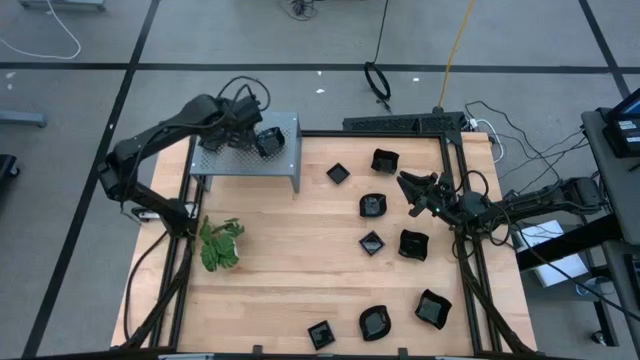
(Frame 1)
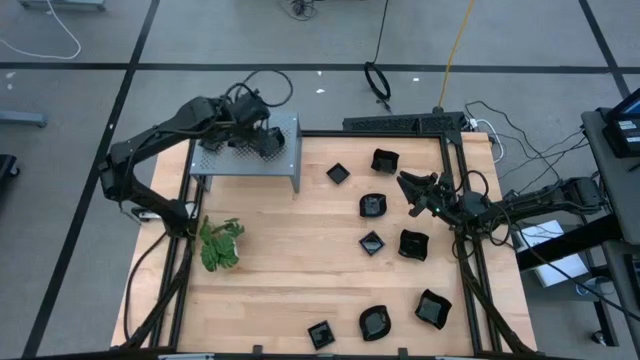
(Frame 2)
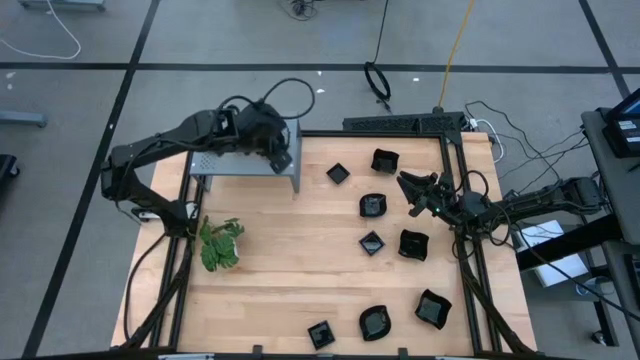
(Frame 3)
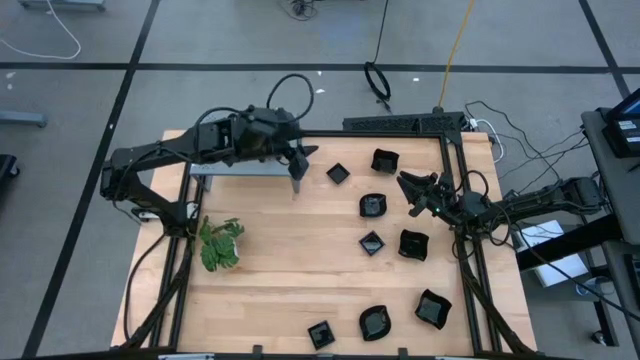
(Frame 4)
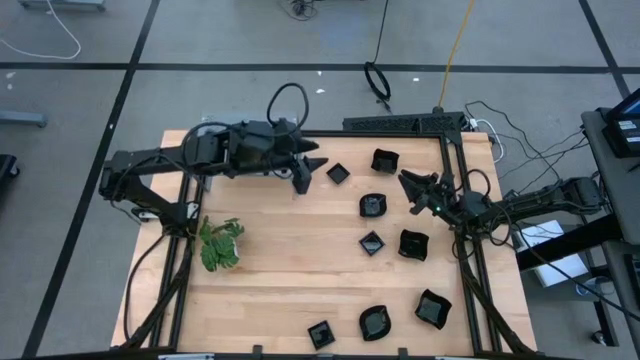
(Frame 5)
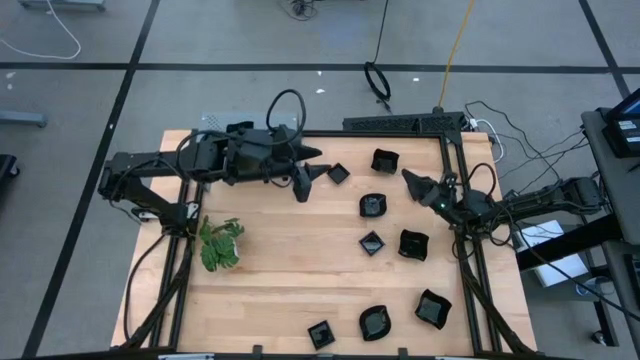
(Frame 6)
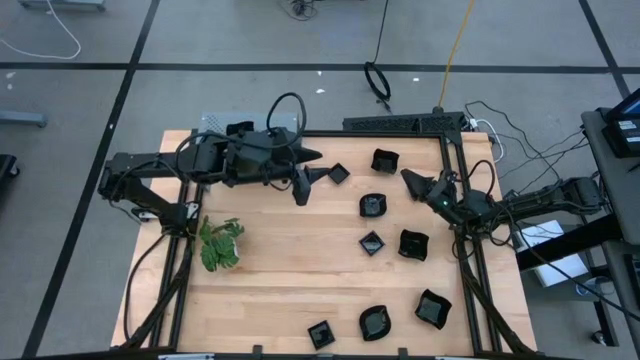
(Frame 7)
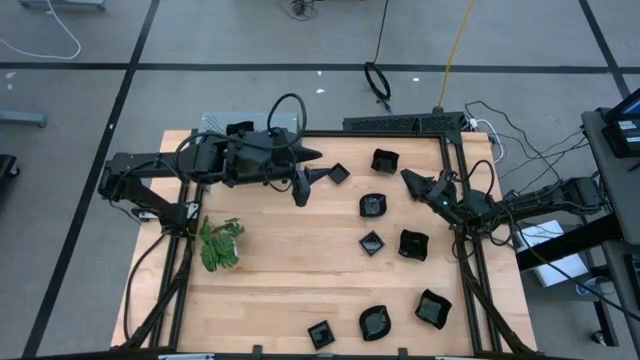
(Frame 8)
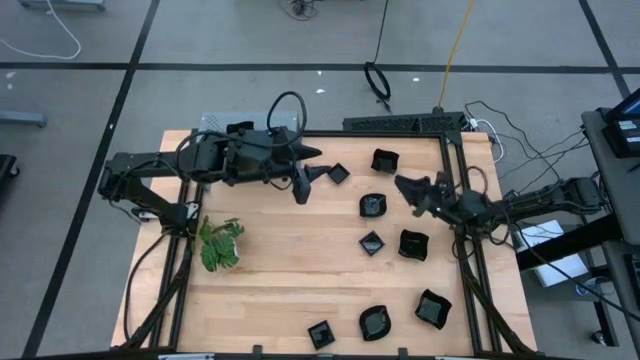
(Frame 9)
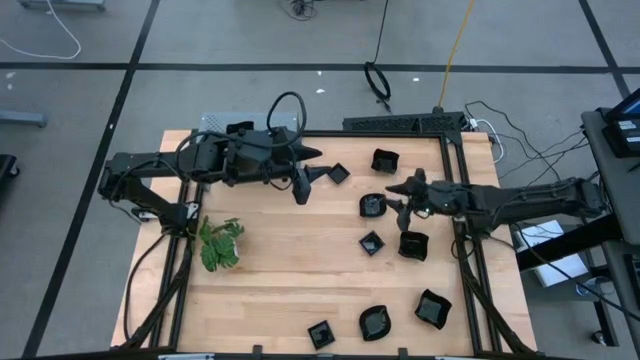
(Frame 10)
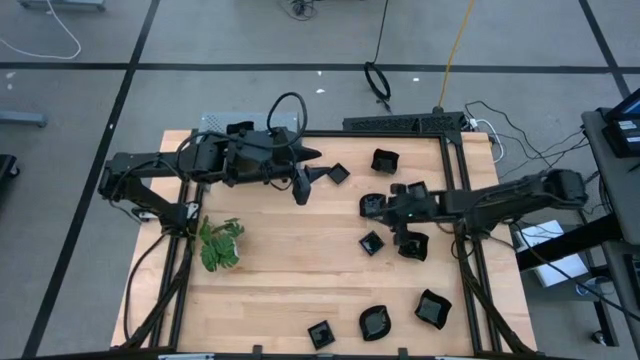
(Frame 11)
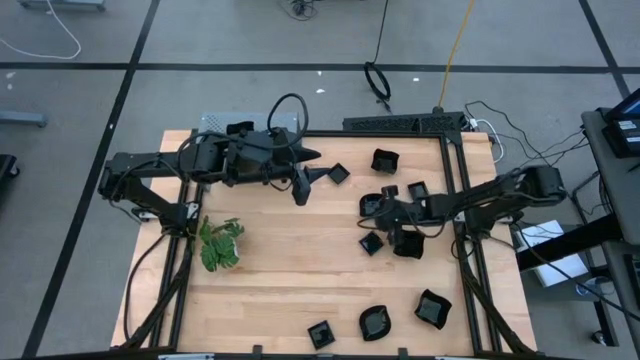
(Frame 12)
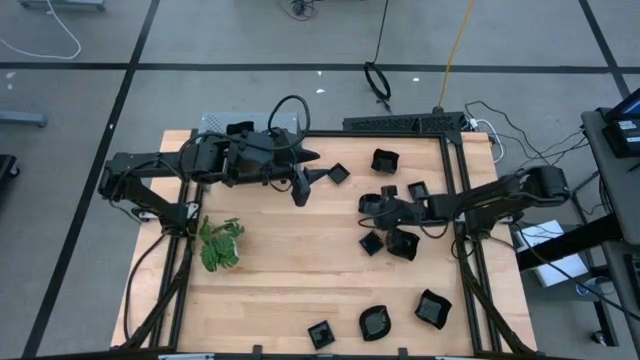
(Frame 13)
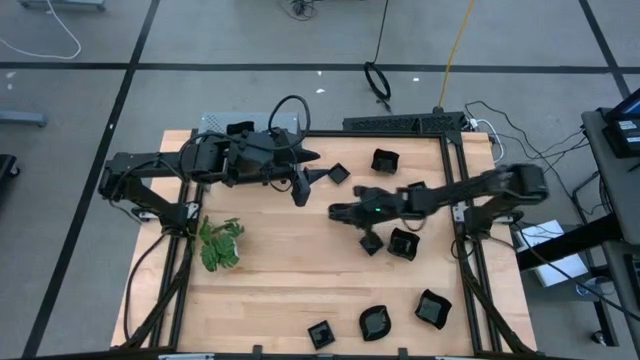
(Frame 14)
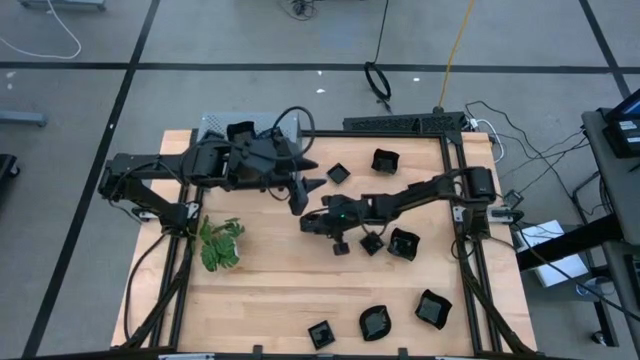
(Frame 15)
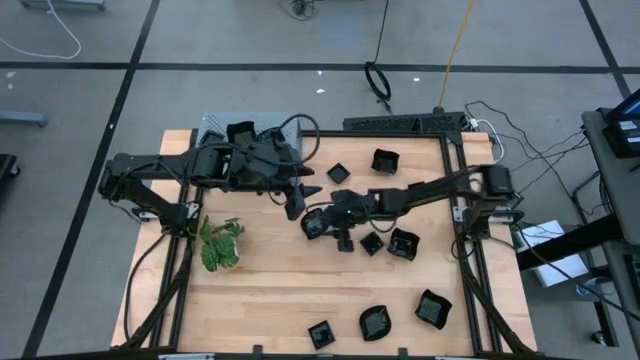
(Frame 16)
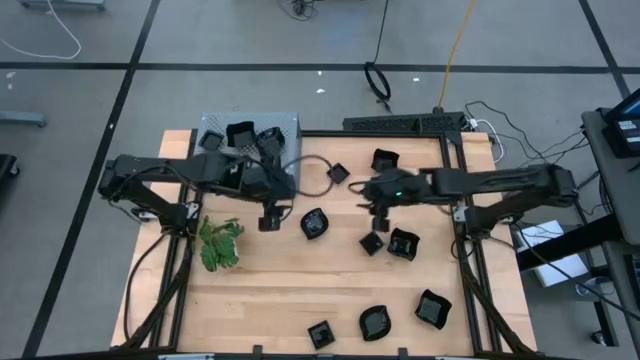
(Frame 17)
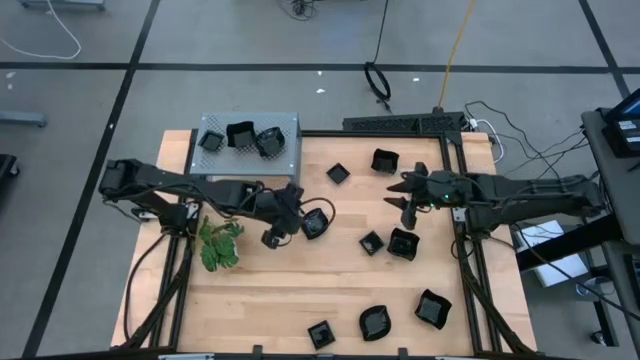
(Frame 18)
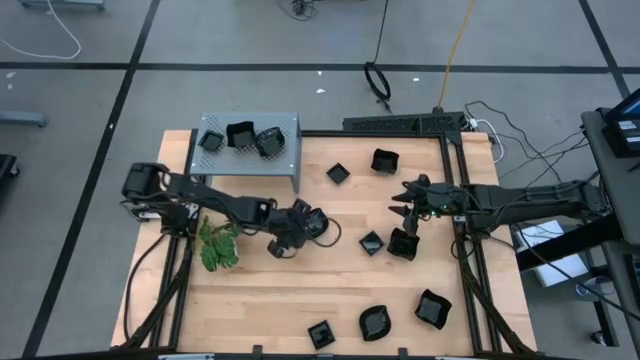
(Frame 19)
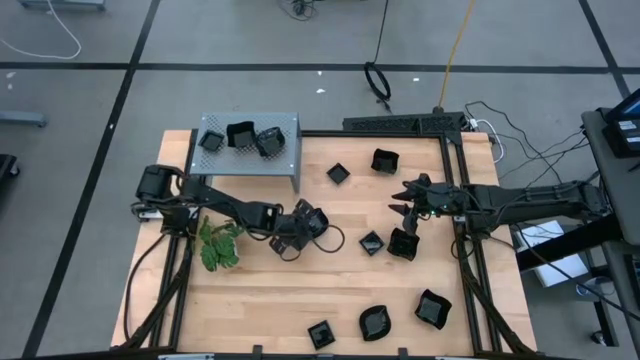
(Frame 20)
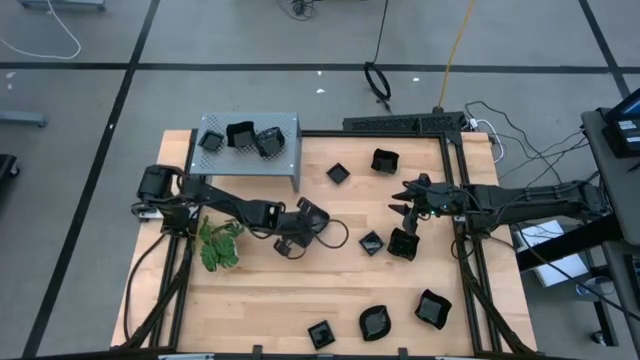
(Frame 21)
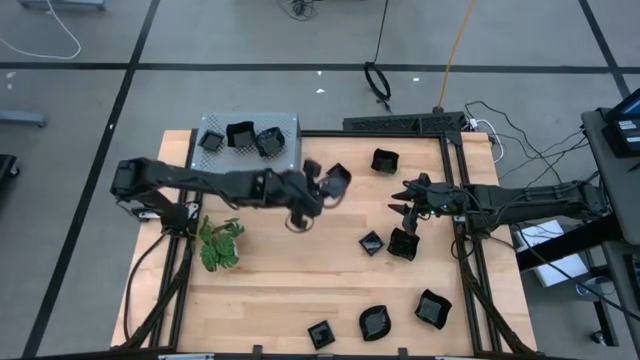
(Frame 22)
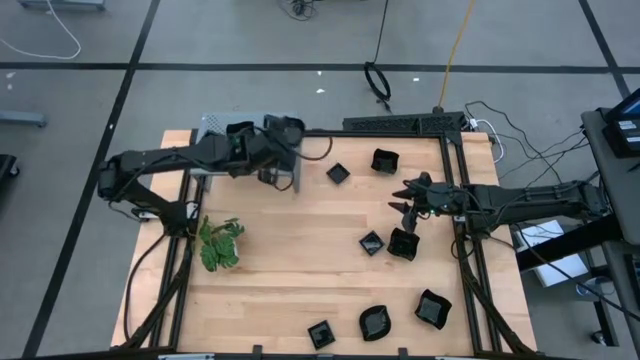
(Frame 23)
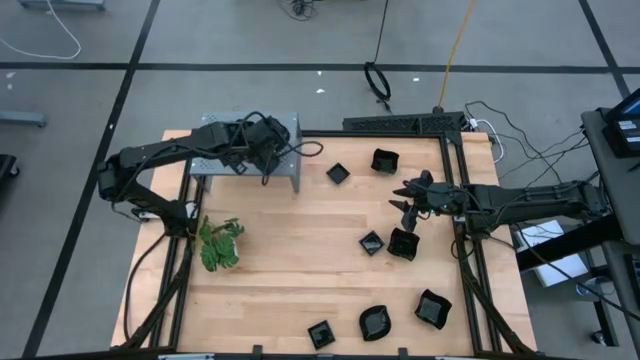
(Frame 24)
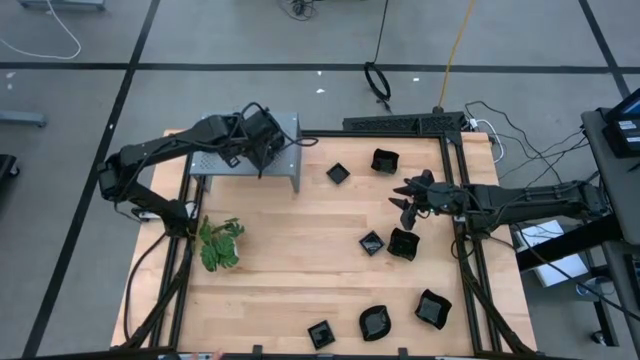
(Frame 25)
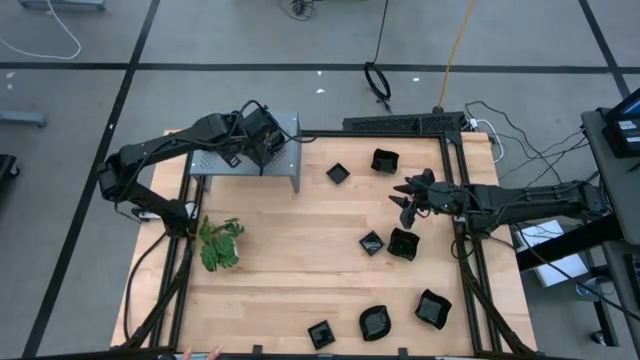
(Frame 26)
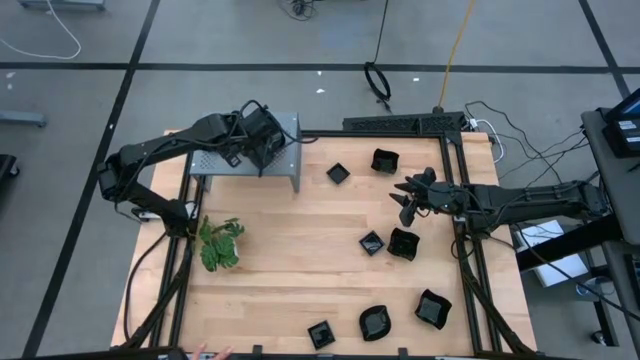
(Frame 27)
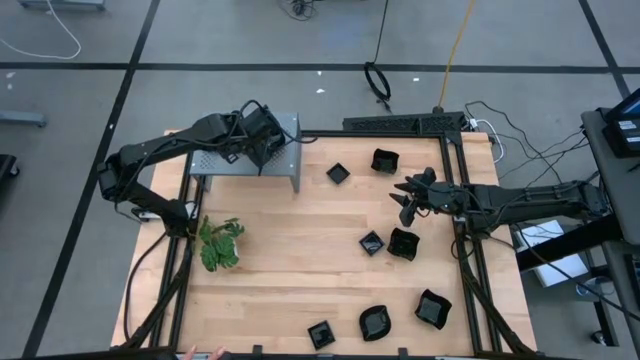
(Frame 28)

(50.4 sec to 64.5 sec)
Task: Pick & Place Mini shaped plates
Stack the leaf-shaped plate on top of the leaf-shaped plate on the shelf

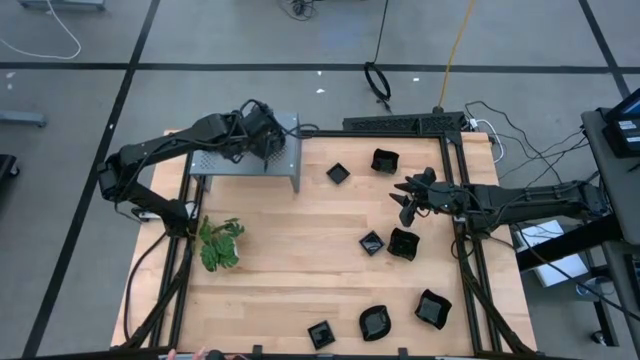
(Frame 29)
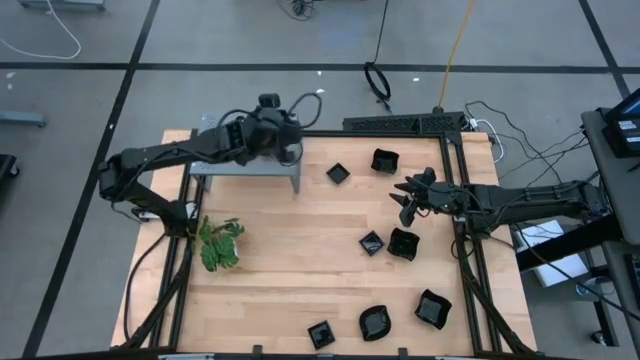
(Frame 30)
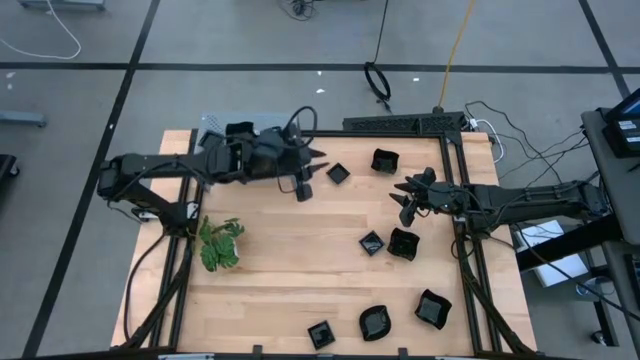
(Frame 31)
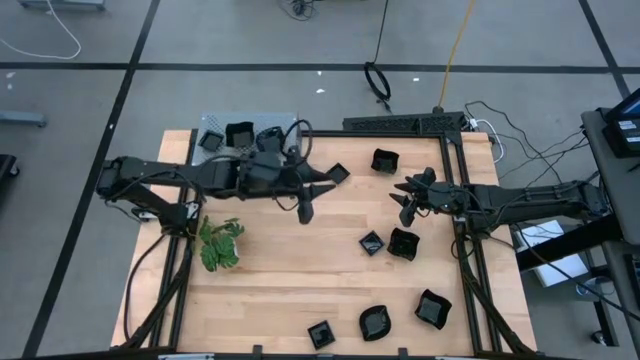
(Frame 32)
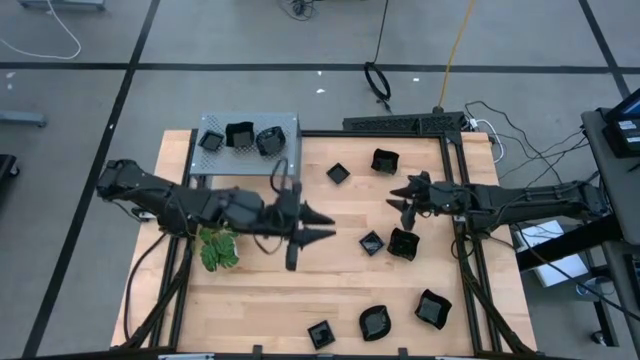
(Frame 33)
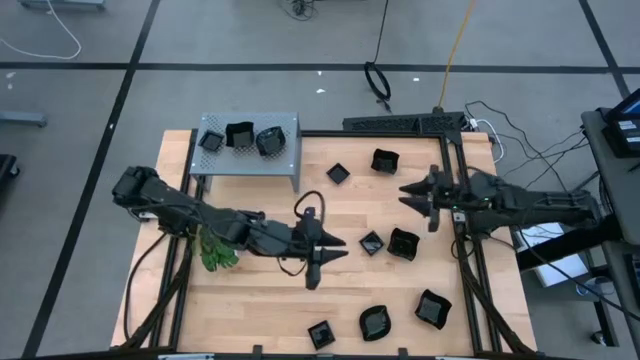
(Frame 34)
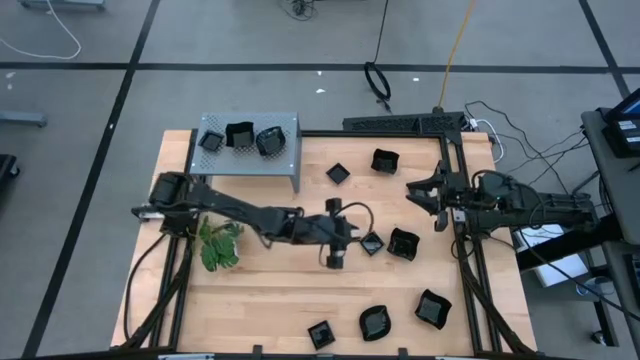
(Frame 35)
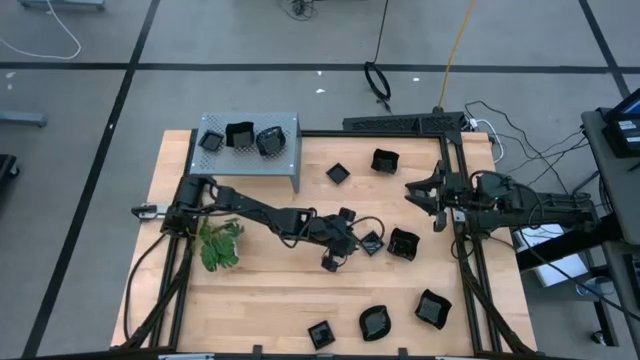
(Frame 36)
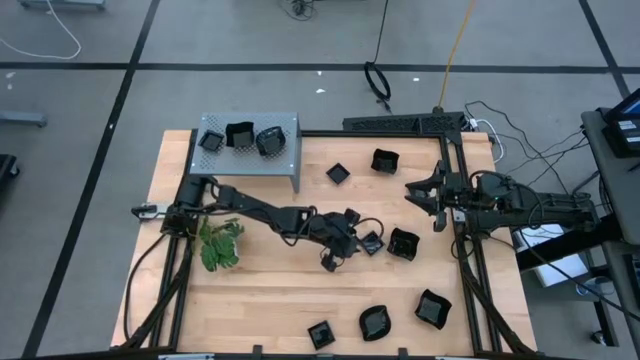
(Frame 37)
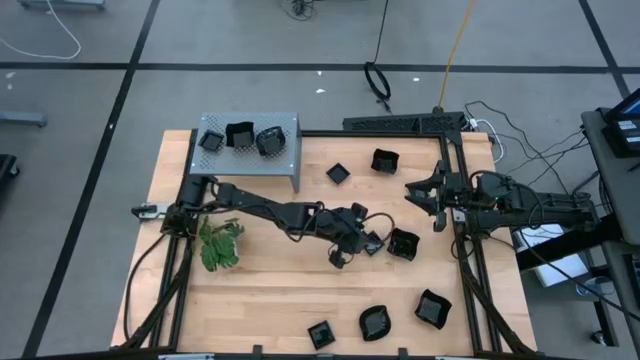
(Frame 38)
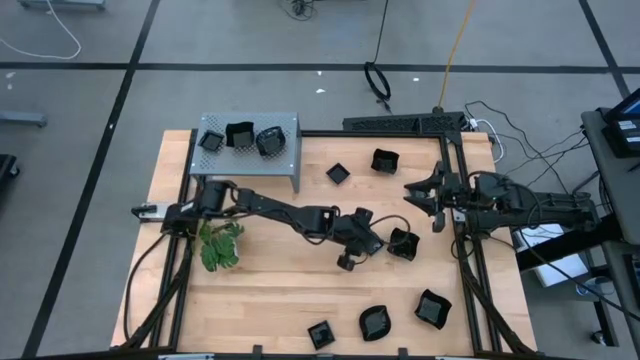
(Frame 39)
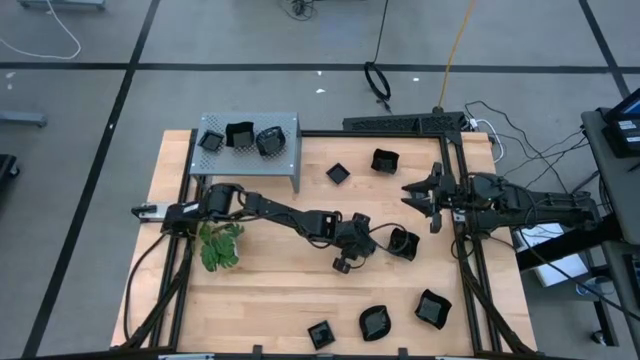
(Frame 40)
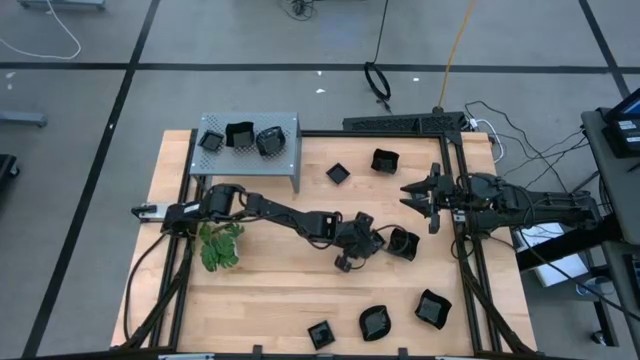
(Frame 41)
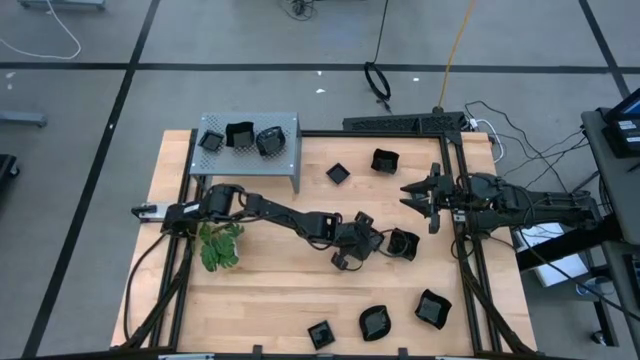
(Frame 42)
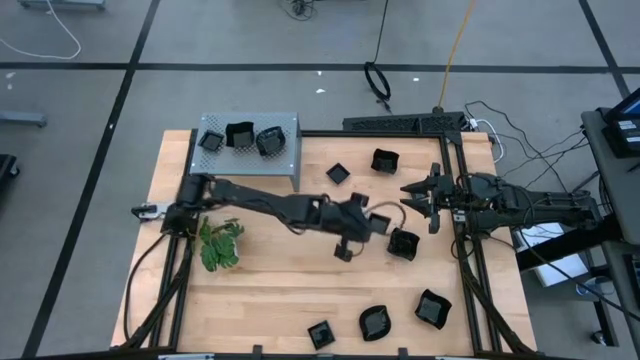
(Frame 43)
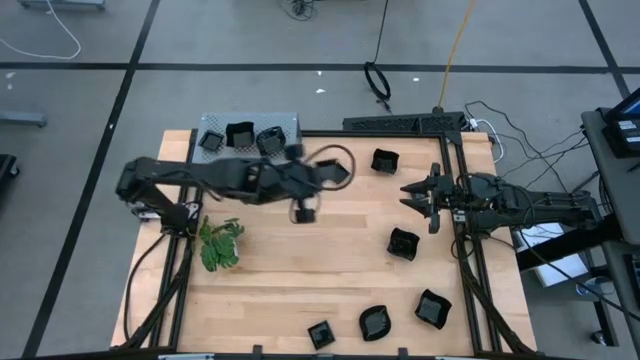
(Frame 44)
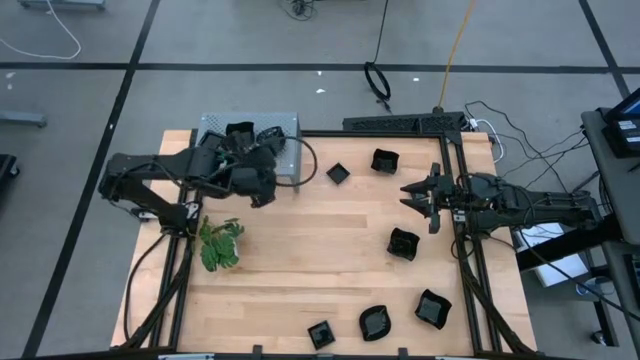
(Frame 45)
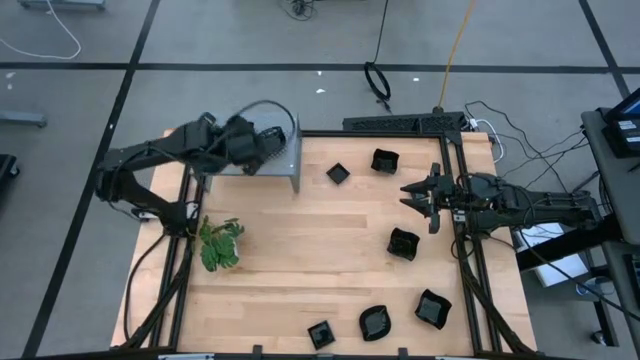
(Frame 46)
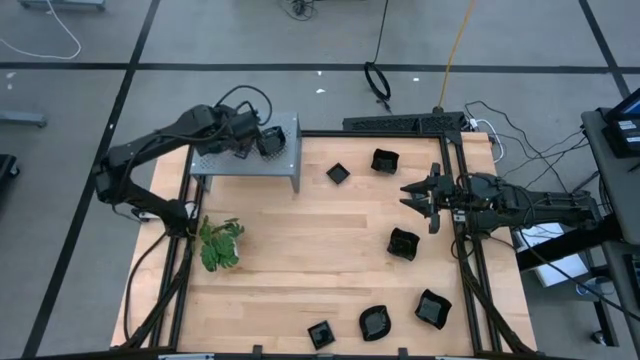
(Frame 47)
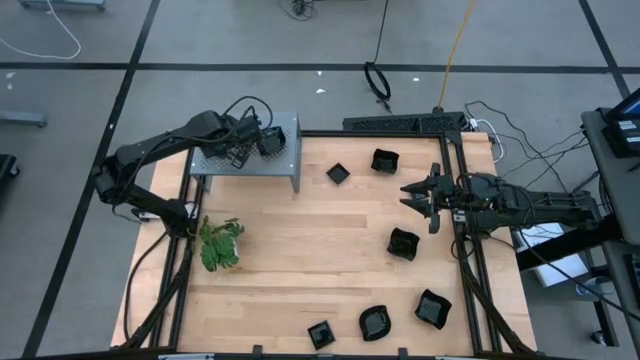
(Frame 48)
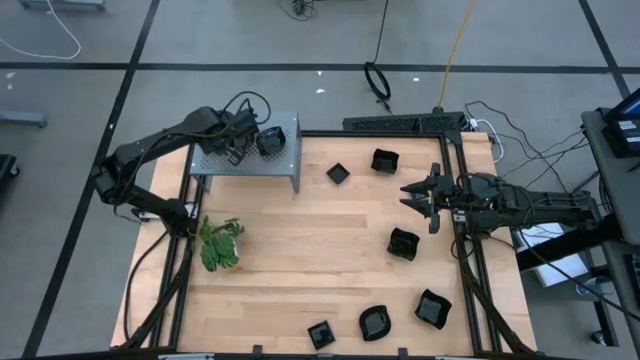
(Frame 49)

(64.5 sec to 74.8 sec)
Stack the square plate on top of the square plate on the shelf
